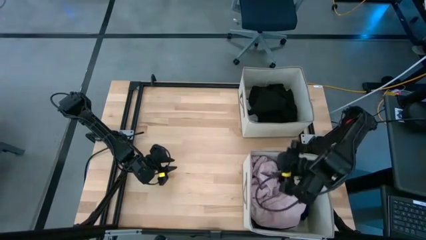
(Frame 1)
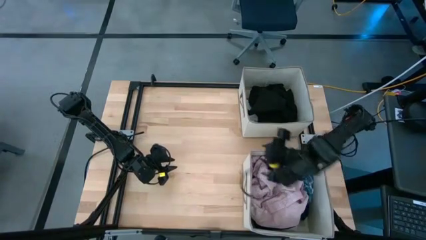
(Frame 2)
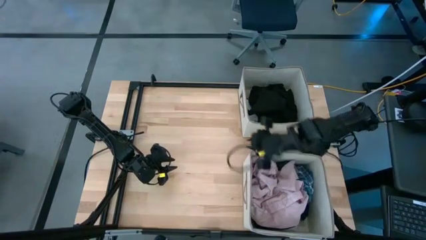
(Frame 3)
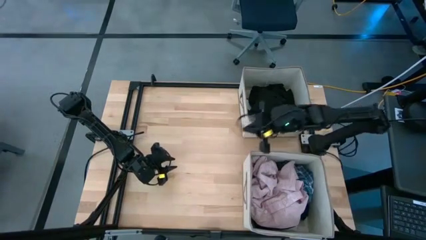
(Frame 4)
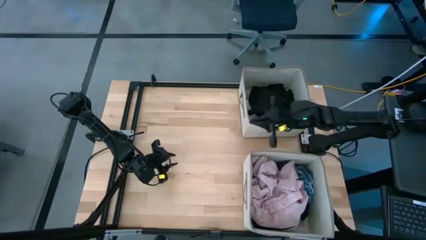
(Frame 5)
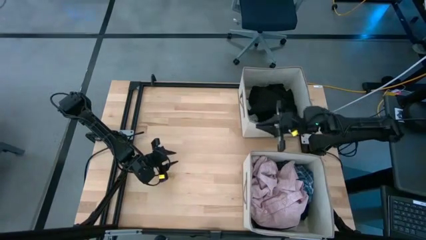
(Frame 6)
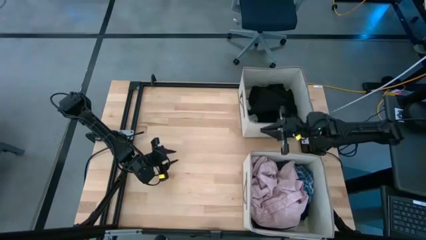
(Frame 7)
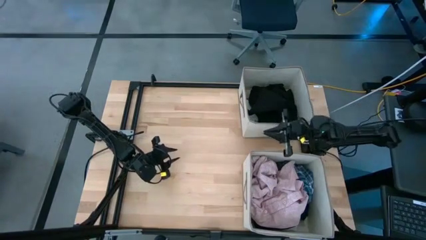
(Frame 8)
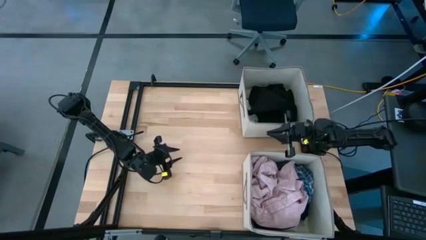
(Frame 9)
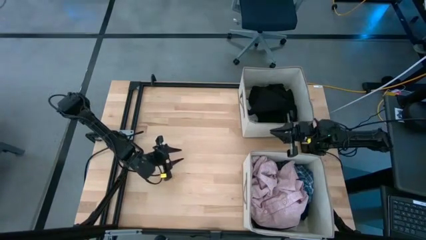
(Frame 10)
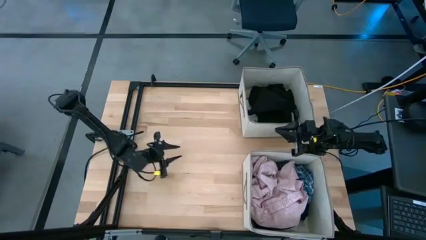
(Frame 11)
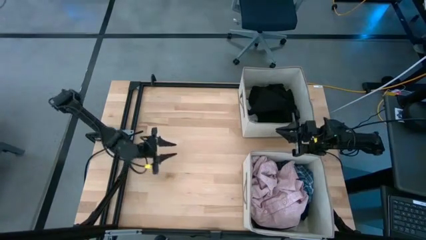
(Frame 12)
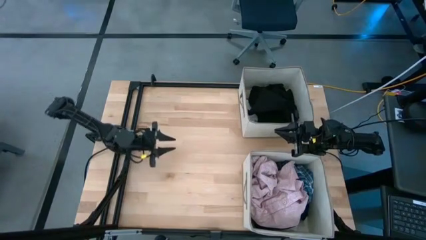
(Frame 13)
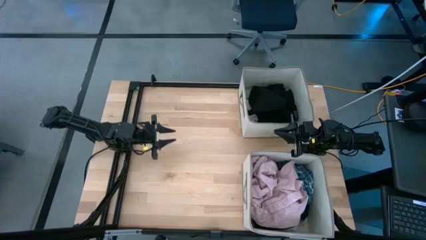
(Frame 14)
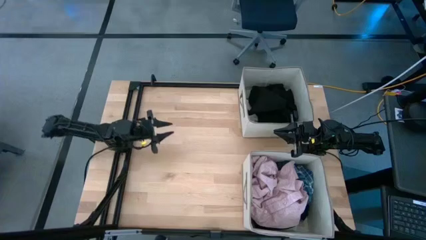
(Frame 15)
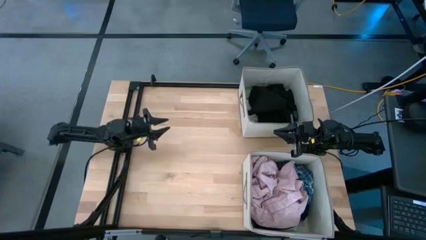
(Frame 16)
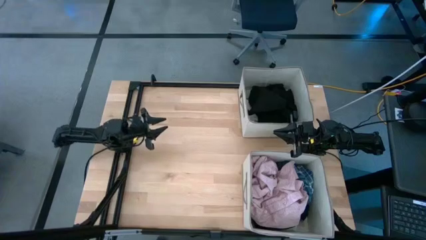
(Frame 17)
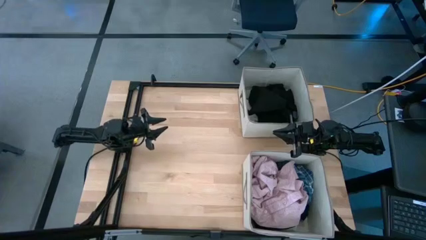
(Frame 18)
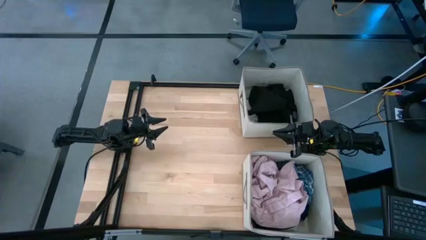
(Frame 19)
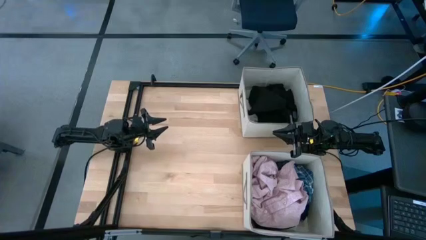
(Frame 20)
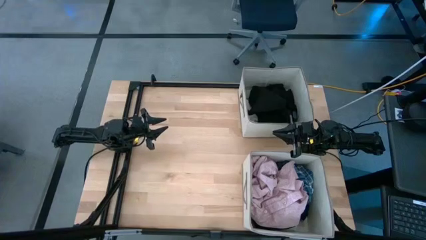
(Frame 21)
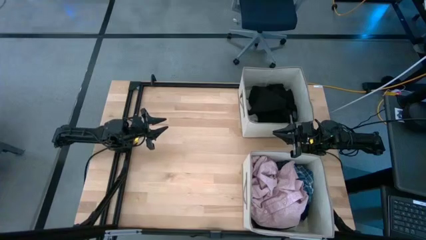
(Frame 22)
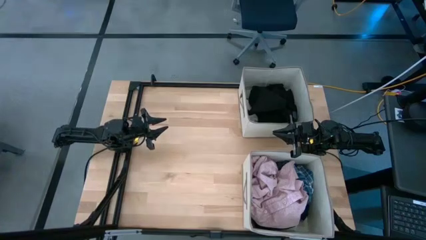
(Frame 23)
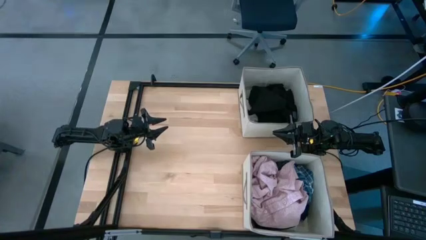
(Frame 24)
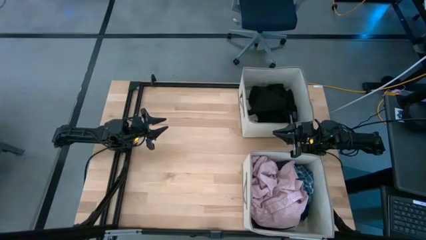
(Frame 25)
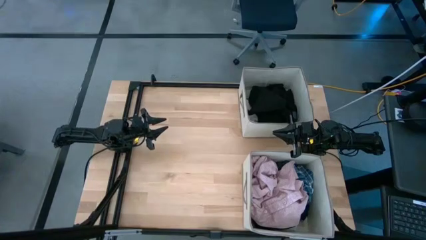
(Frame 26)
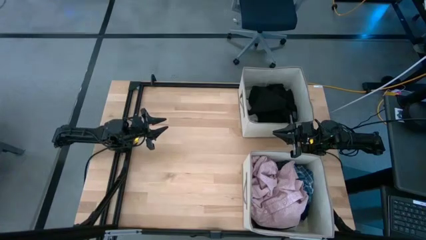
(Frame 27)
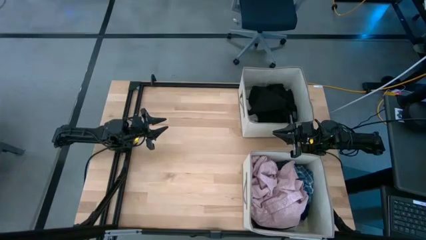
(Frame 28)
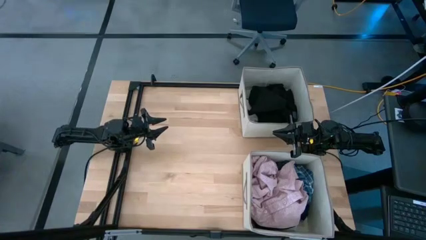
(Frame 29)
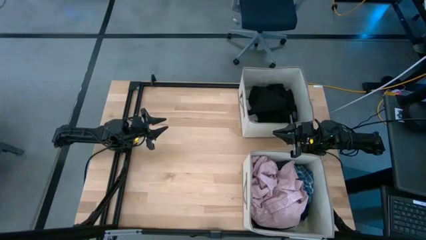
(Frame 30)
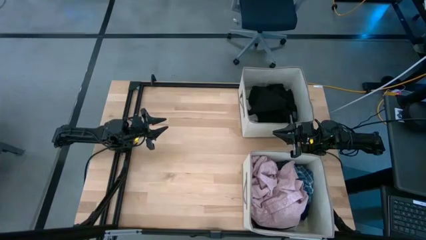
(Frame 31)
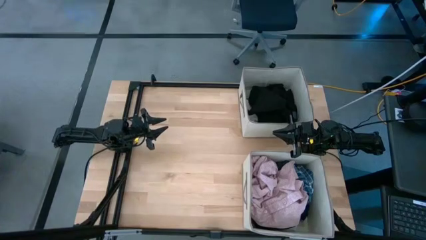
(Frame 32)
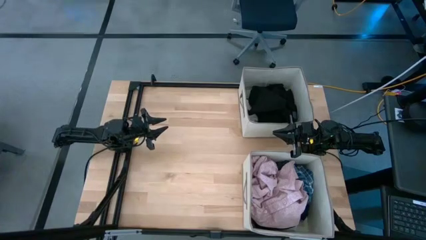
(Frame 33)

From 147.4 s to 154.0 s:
Task: Sort clothes
Return to Home Position

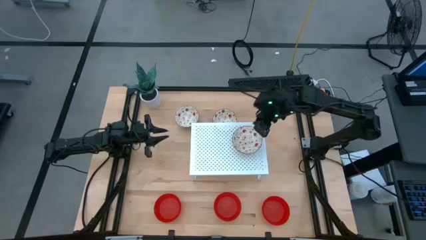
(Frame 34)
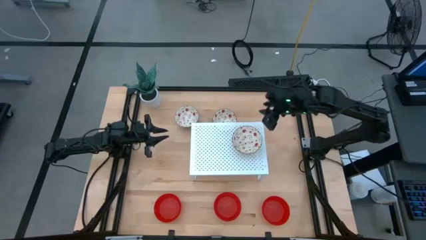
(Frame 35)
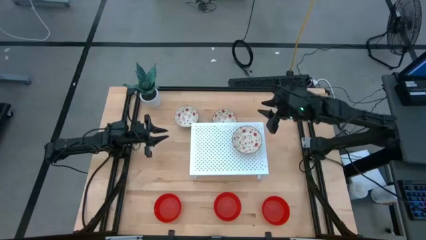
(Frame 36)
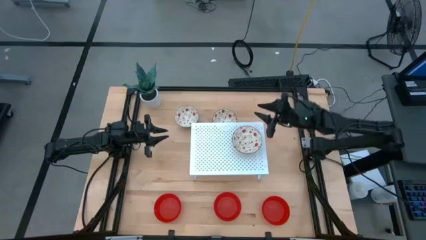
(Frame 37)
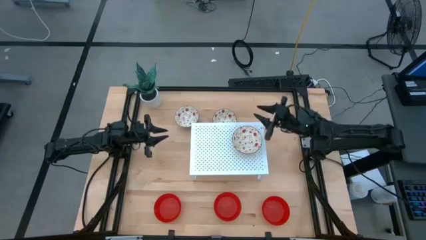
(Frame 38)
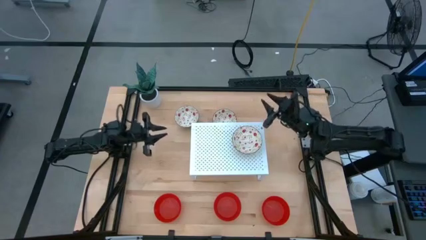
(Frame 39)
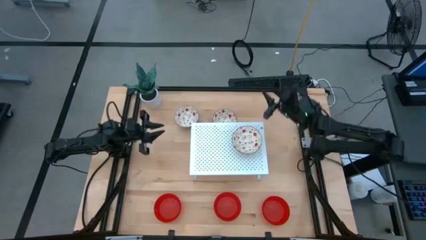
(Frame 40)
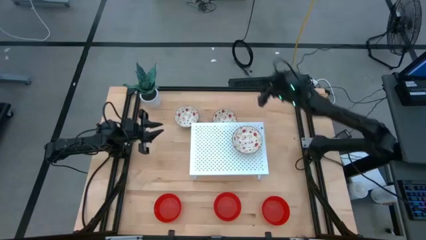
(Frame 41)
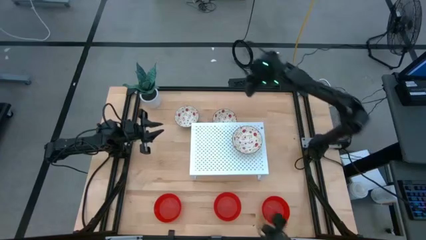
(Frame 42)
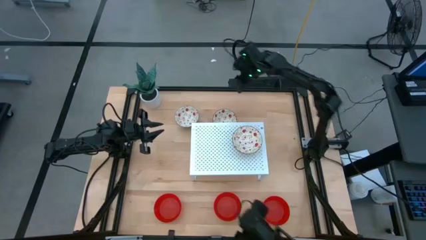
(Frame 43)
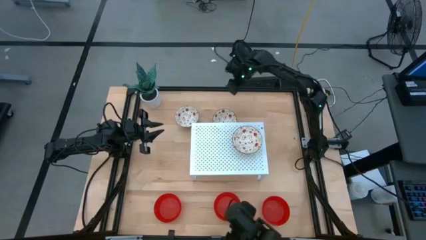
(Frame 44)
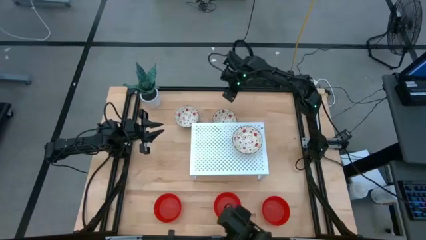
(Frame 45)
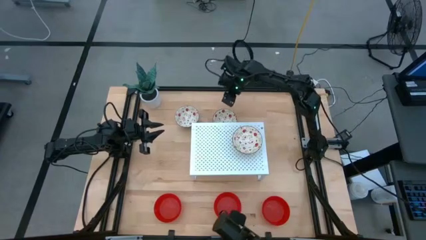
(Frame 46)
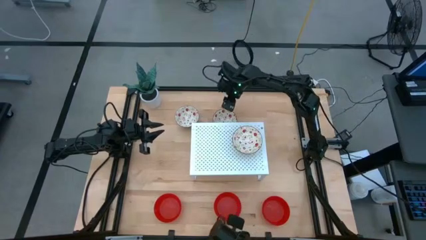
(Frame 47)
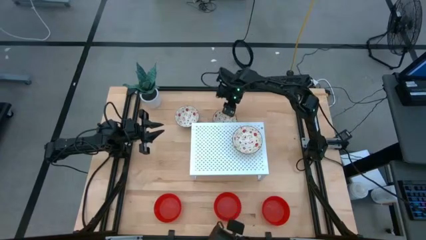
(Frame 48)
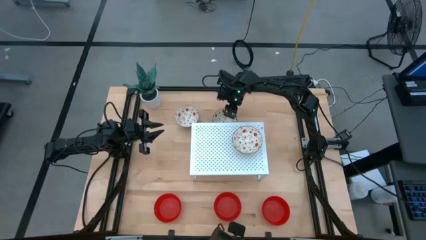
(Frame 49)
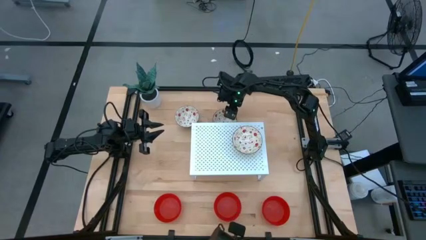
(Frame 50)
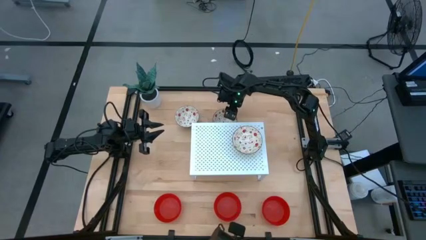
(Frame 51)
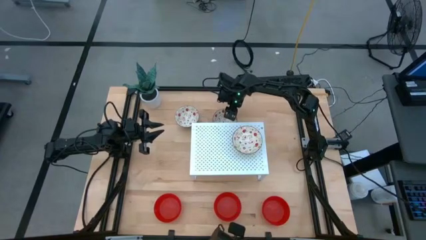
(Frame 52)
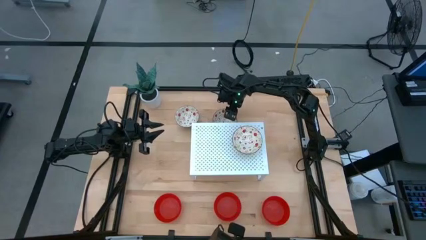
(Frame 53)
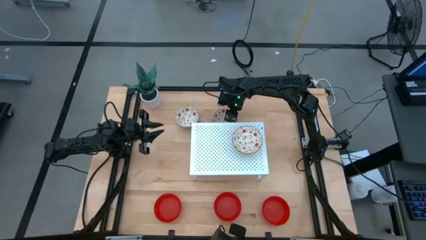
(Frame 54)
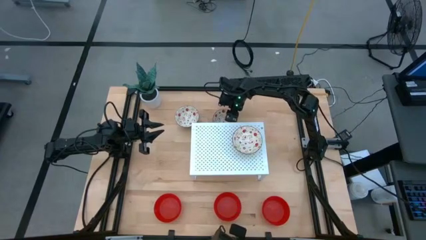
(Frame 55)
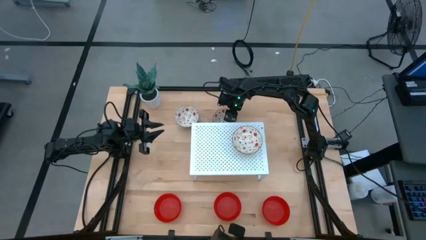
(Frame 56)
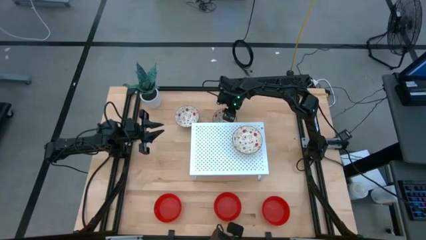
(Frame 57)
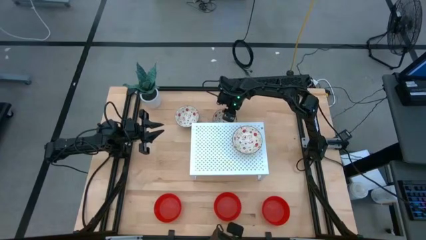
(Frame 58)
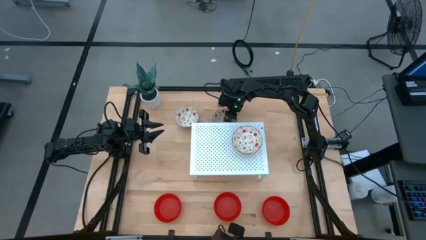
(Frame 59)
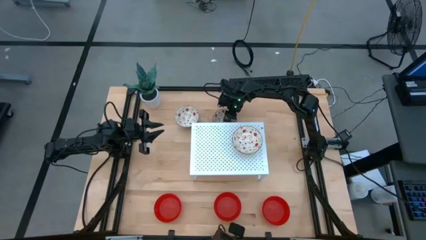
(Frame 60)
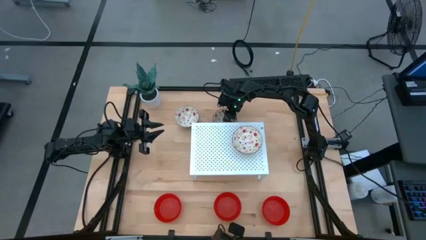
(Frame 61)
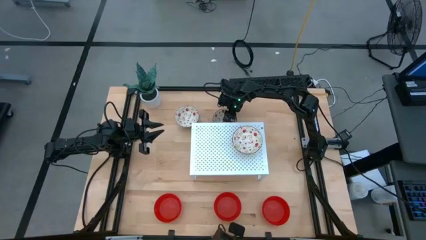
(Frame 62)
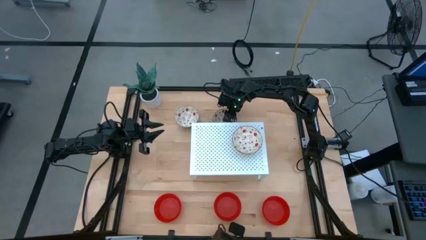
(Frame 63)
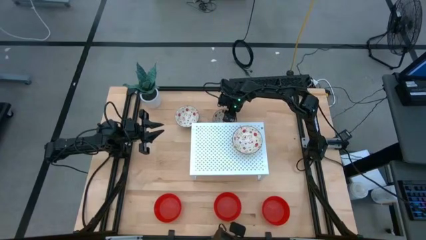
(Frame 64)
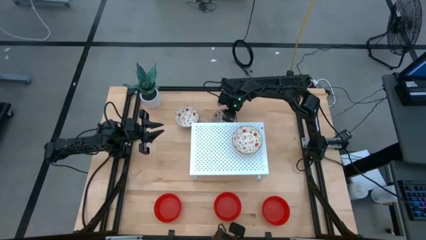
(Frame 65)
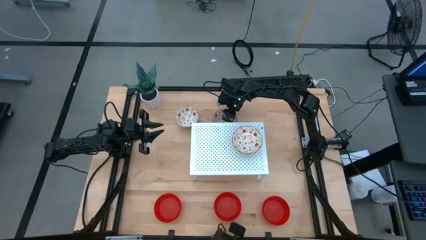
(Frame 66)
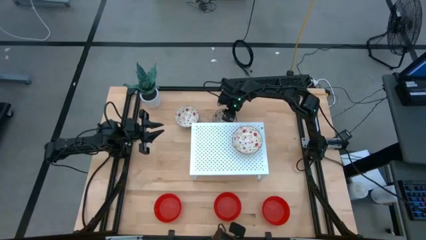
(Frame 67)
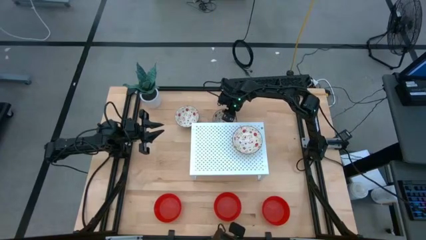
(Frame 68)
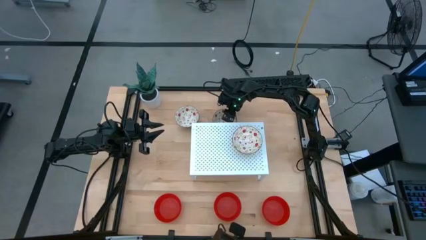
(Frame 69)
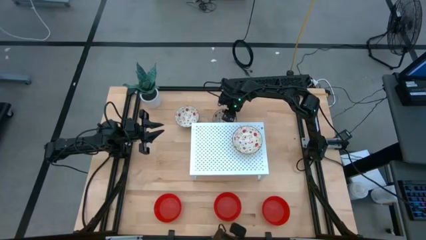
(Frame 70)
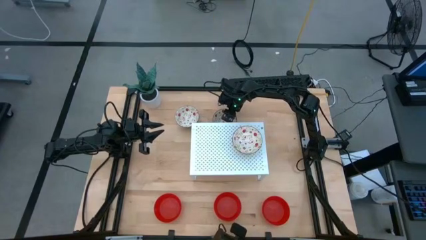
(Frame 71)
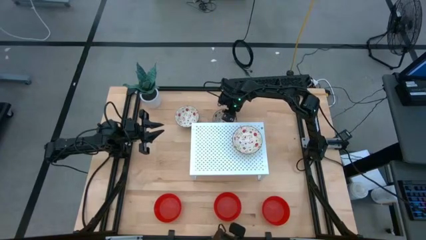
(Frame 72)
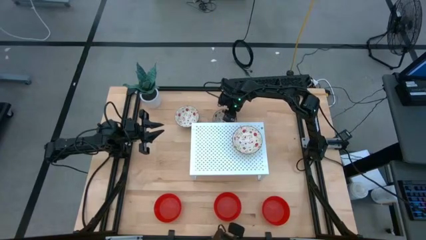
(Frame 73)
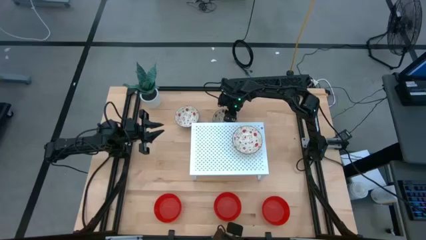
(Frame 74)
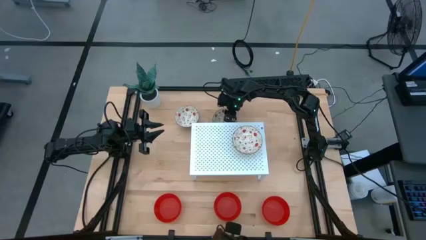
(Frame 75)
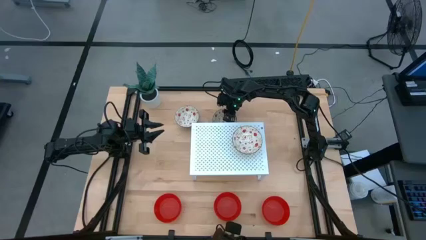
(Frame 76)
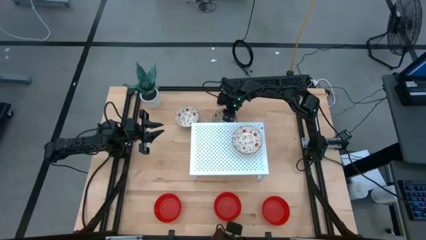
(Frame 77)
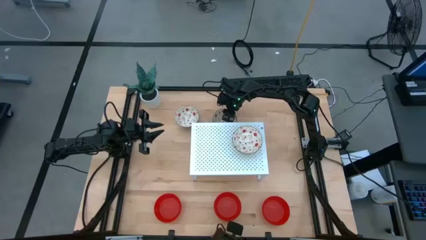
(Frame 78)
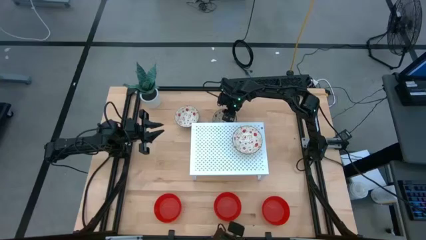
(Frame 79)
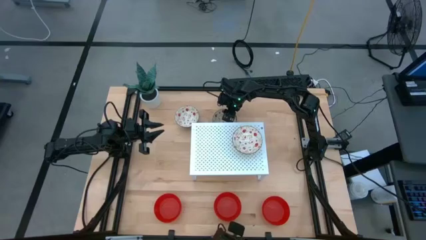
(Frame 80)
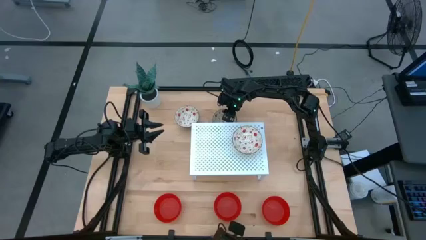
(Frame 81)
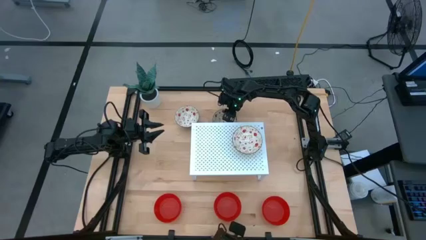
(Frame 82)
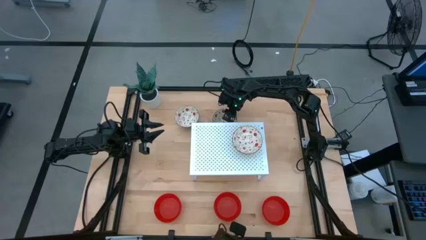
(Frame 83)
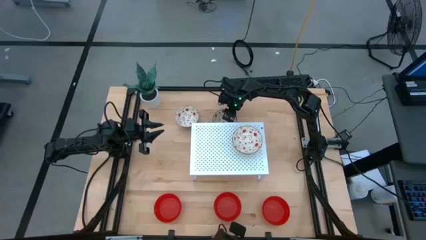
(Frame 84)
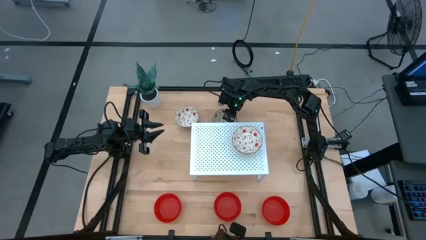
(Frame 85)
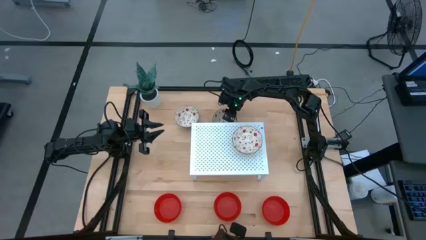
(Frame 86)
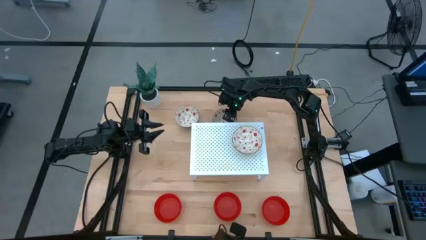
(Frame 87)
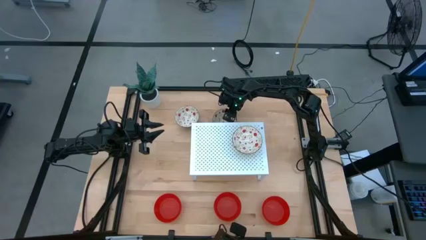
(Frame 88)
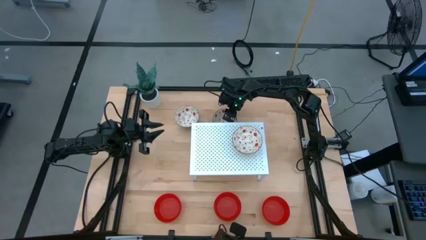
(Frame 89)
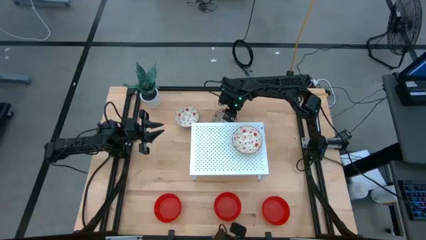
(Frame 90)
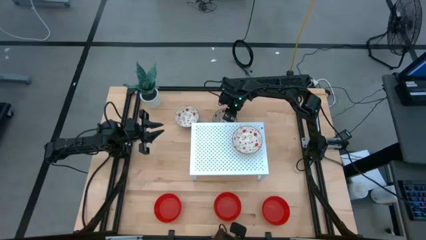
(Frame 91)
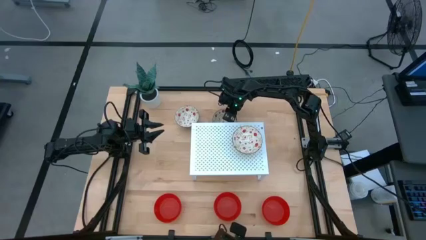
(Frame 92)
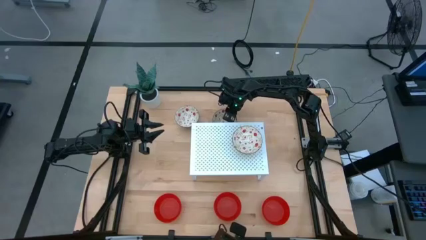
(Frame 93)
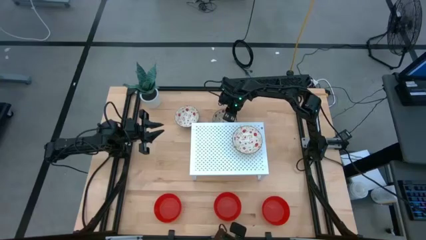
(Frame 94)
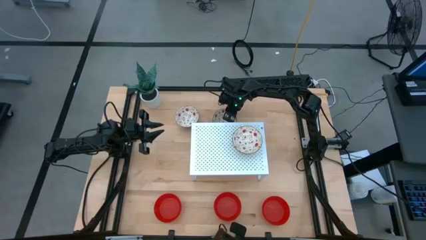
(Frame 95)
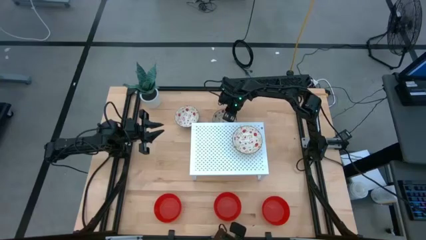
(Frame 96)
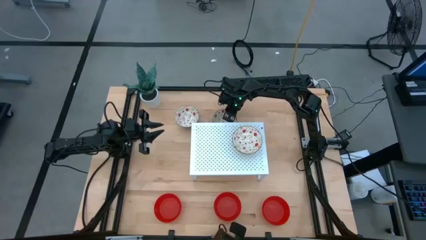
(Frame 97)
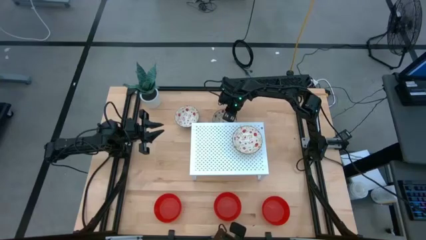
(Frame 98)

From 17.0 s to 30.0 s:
Task: Pick & Place Mini bowls
Stack the right white patterned bowl on top of the white patterned bowl on the shelf
